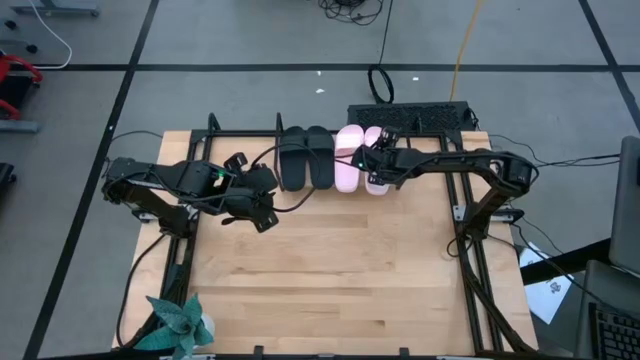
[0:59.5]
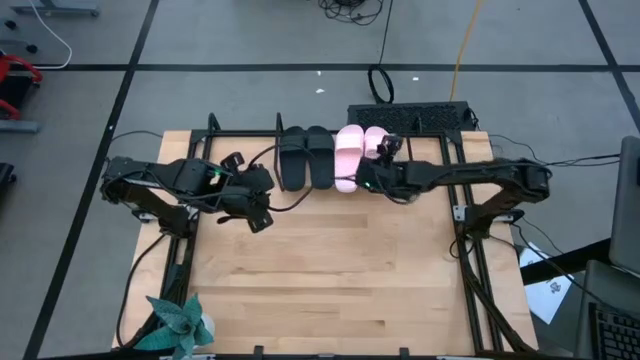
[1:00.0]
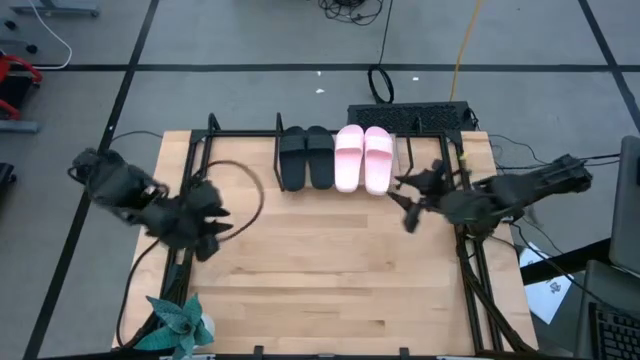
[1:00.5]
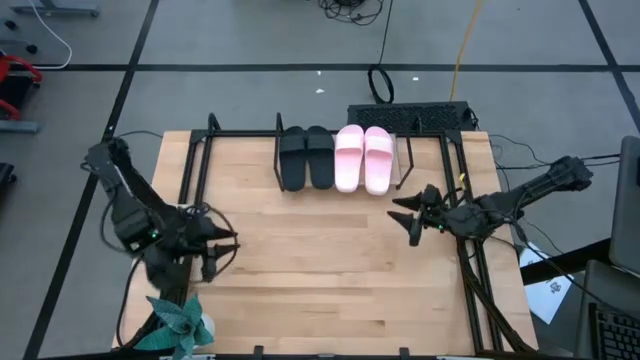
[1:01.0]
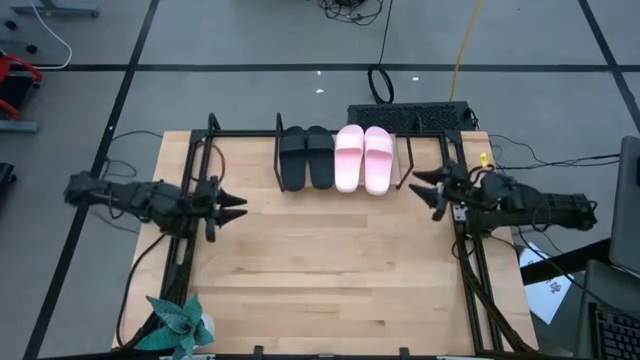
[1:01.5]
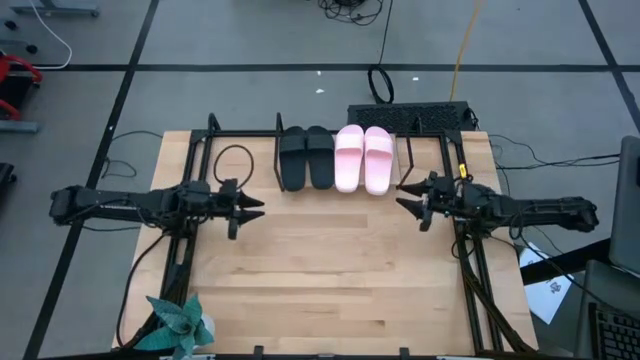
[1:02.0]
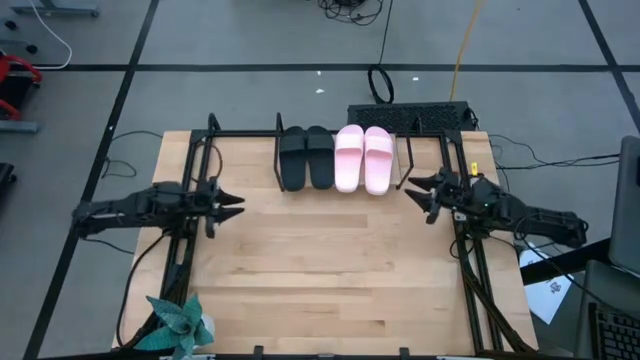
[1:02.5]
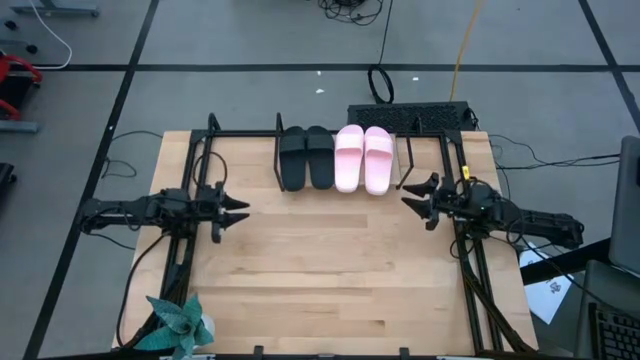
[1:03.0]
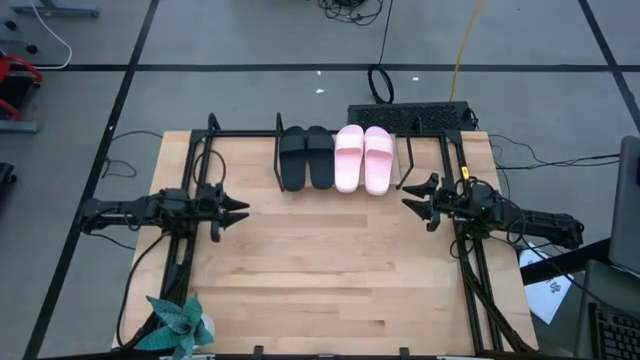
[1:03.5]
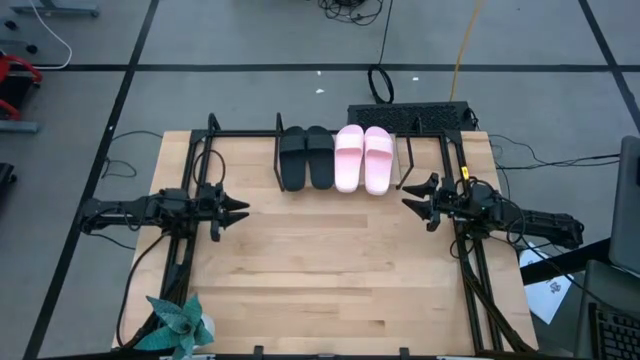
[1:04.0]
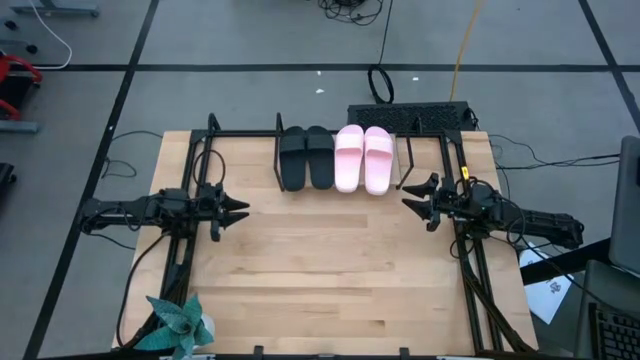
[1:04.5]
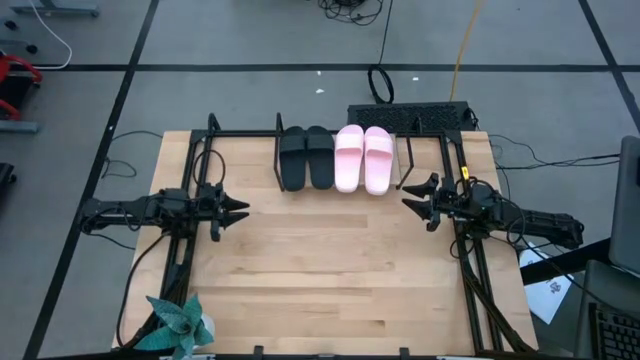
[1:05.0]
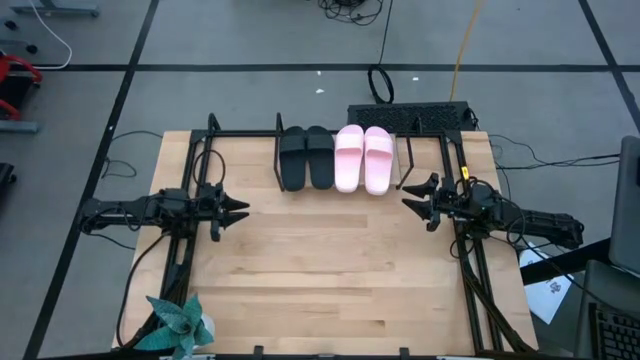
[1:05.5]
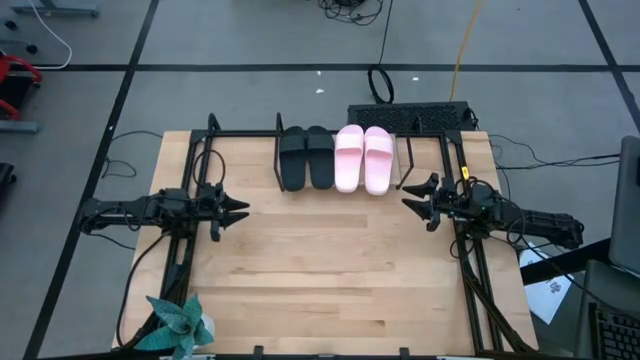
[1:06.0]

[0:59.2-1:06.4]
Task: Pick and place slides into the shelf
Return to Home Position

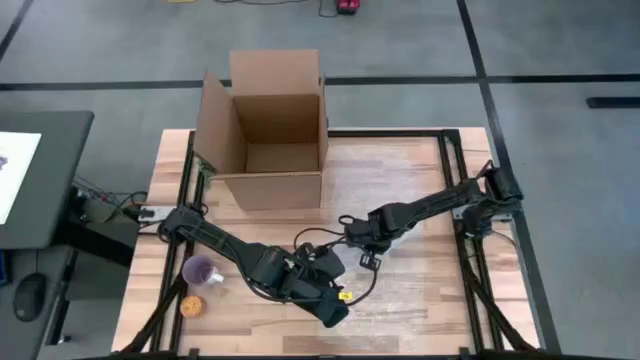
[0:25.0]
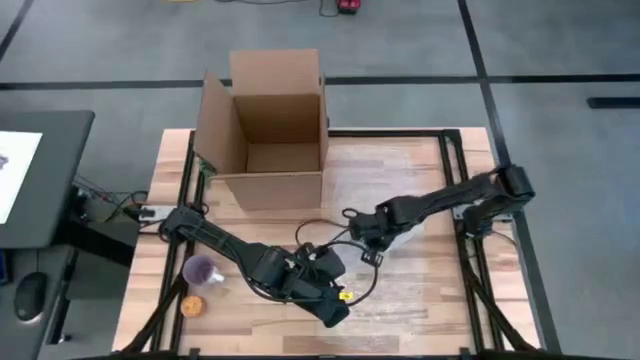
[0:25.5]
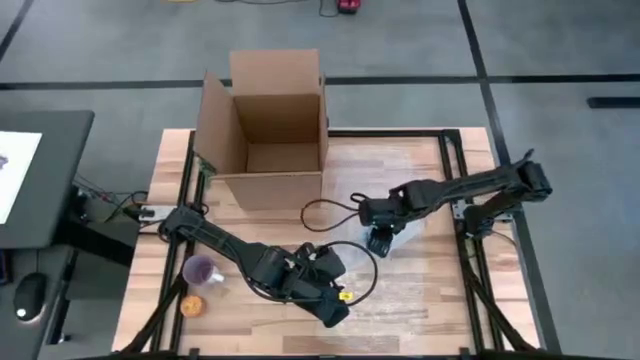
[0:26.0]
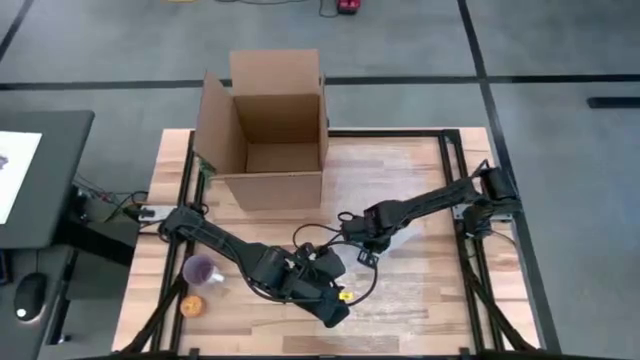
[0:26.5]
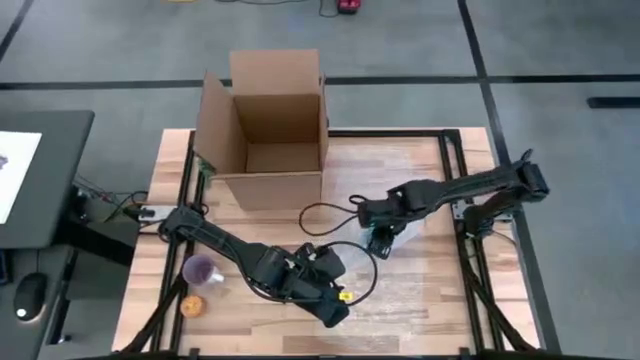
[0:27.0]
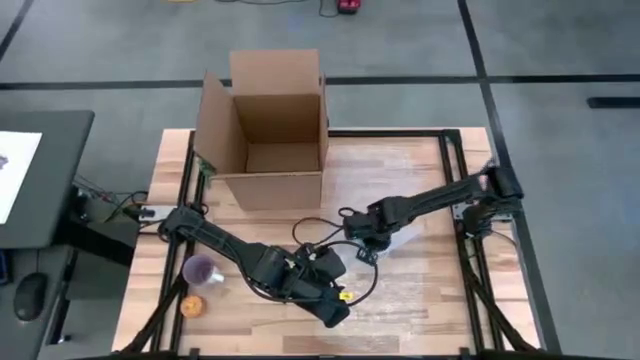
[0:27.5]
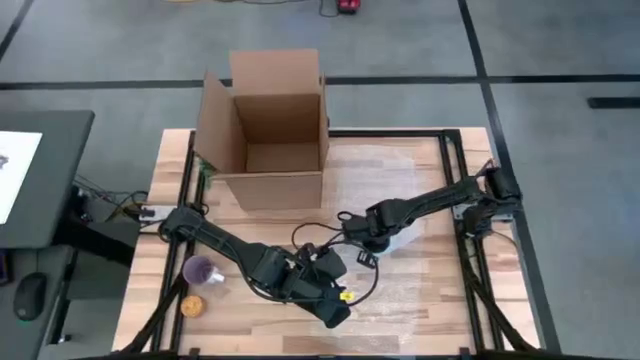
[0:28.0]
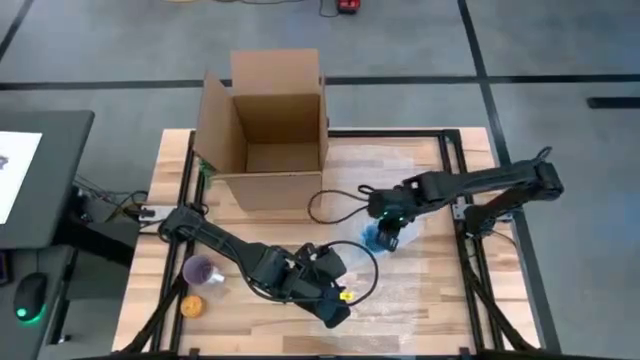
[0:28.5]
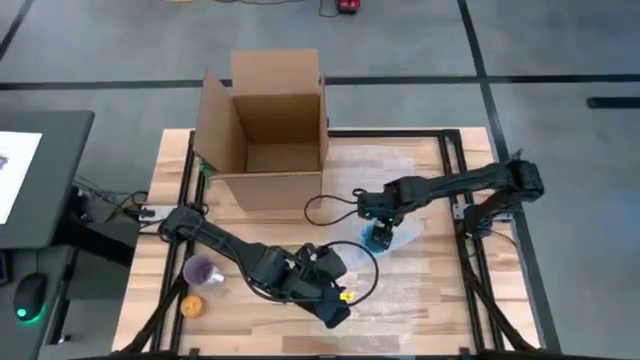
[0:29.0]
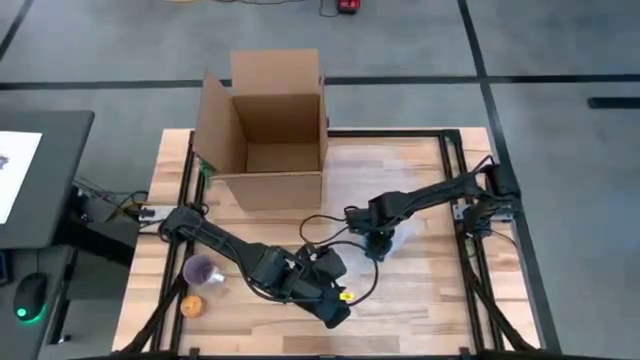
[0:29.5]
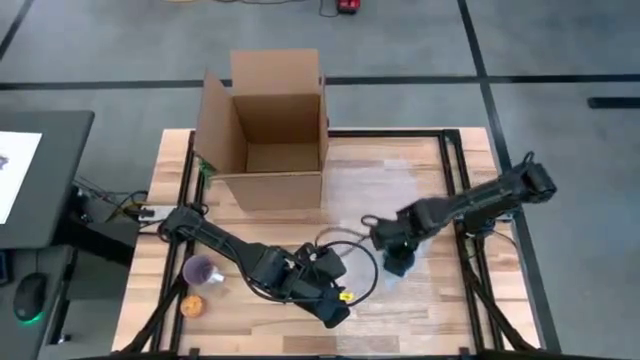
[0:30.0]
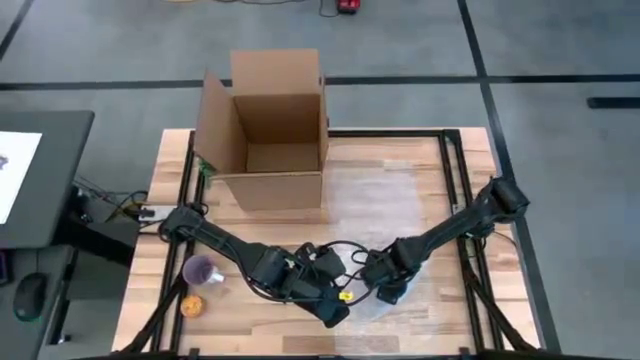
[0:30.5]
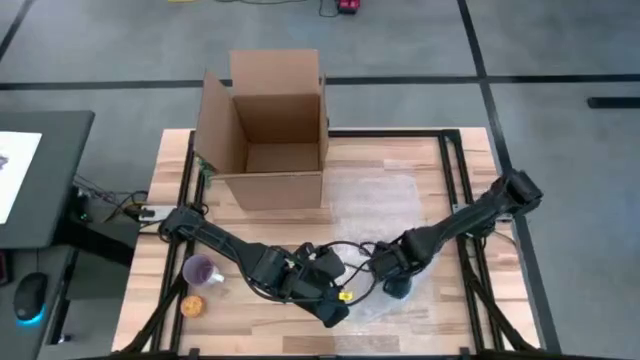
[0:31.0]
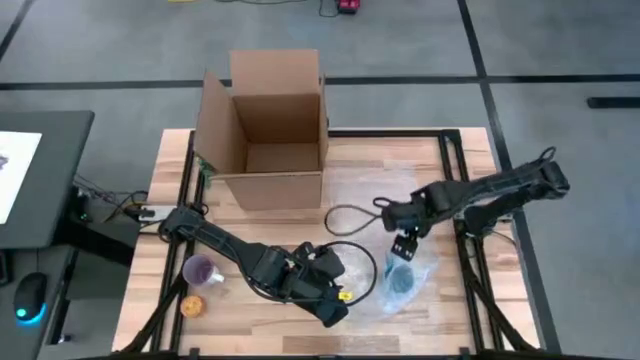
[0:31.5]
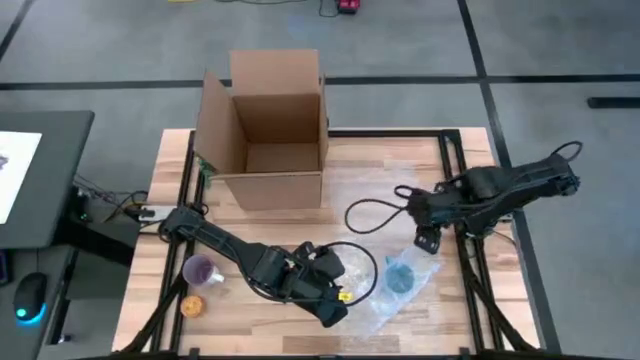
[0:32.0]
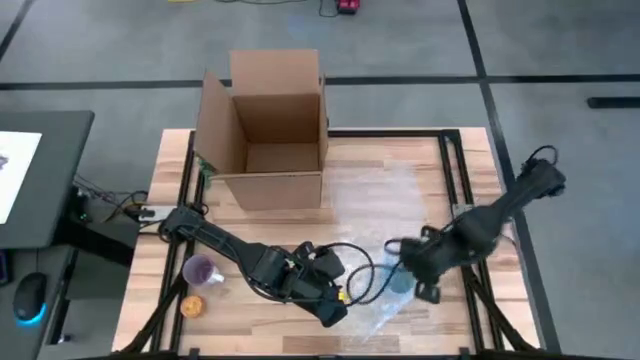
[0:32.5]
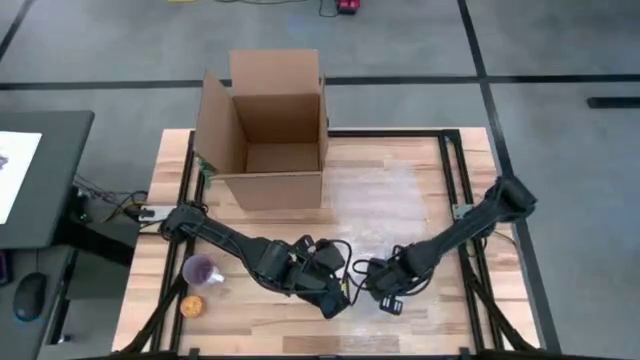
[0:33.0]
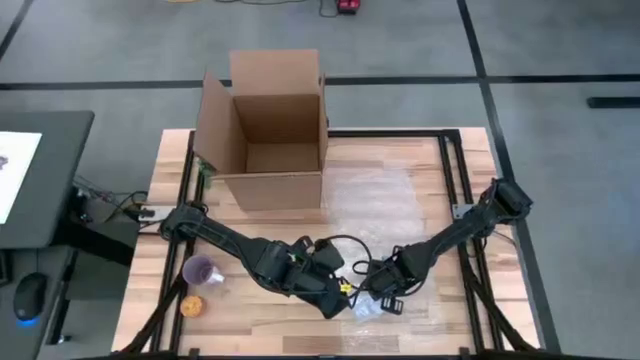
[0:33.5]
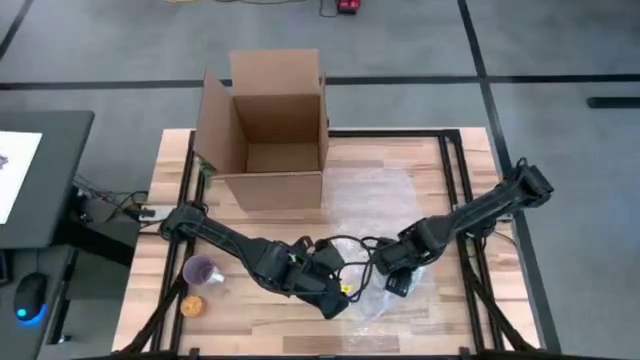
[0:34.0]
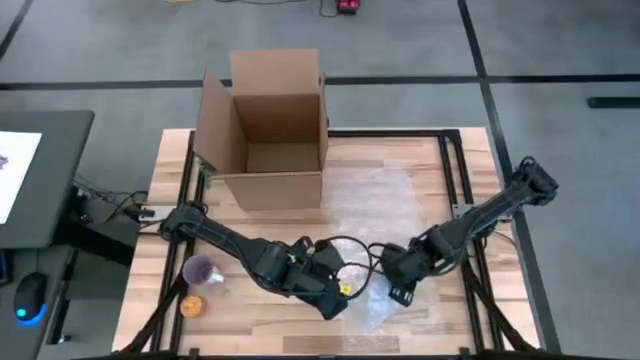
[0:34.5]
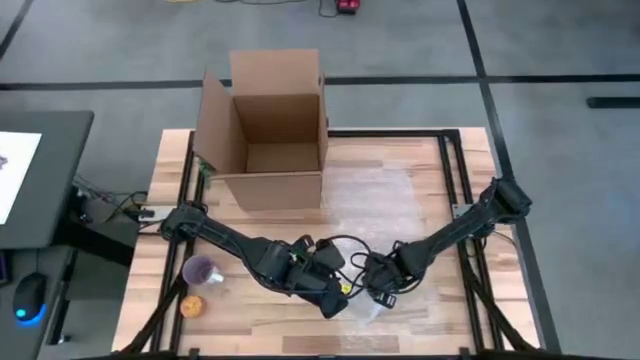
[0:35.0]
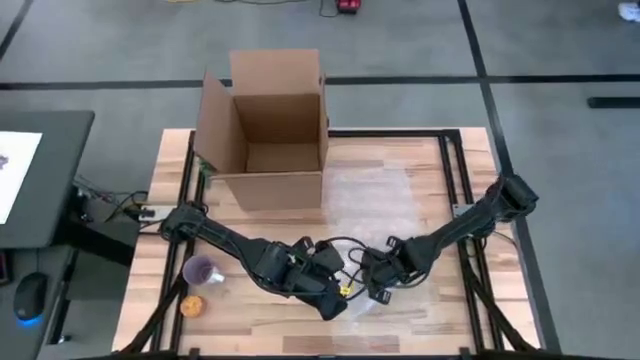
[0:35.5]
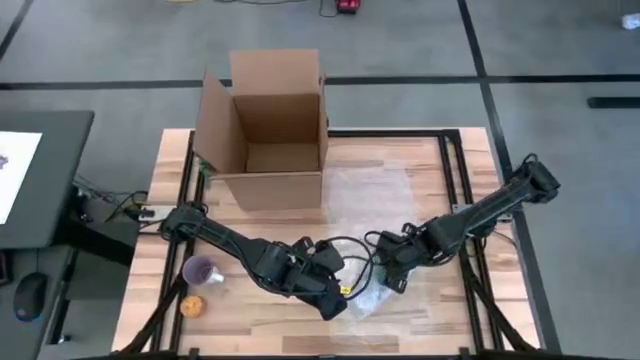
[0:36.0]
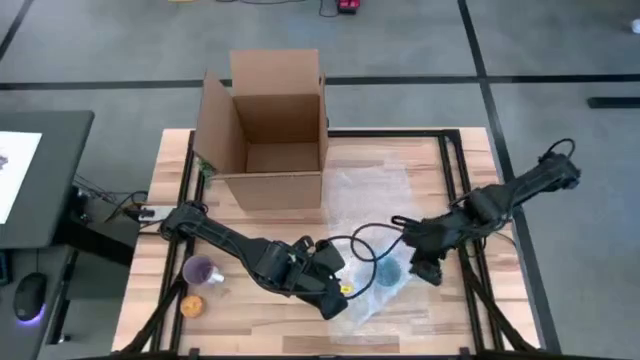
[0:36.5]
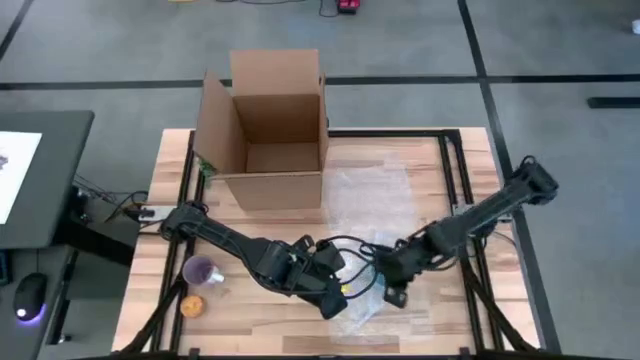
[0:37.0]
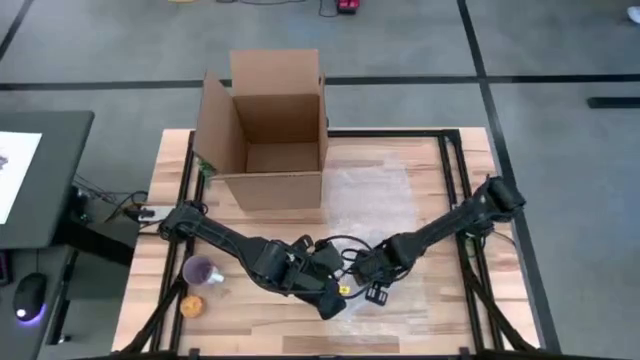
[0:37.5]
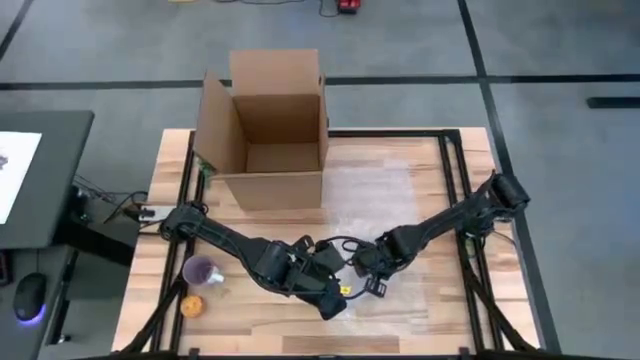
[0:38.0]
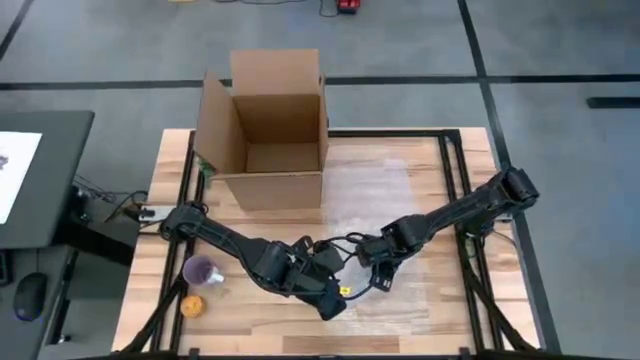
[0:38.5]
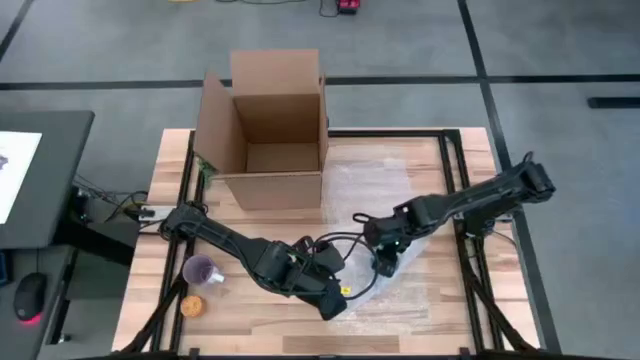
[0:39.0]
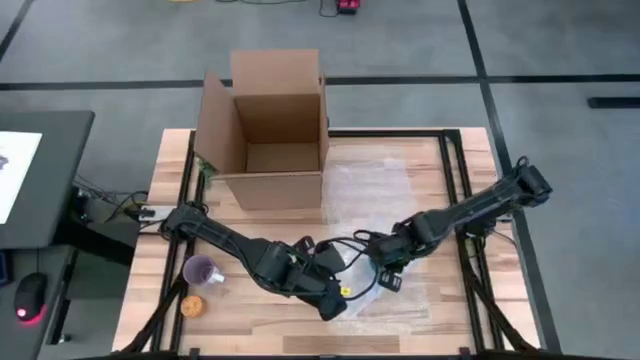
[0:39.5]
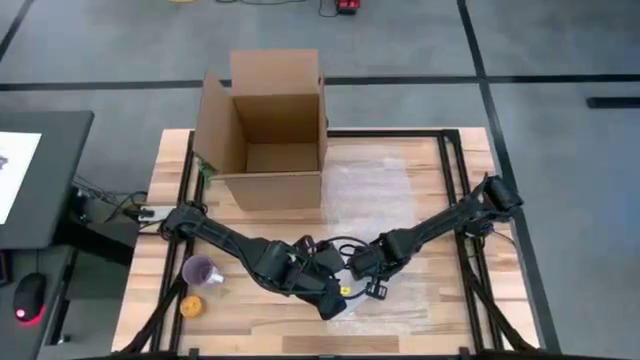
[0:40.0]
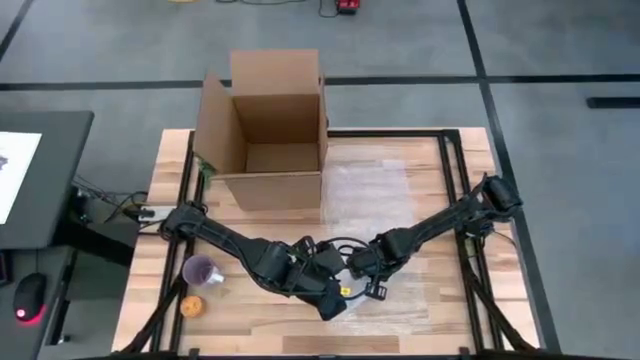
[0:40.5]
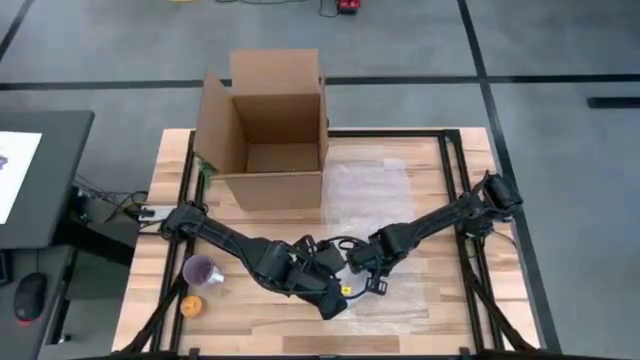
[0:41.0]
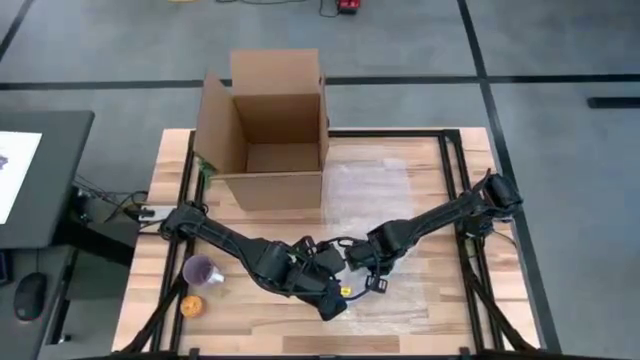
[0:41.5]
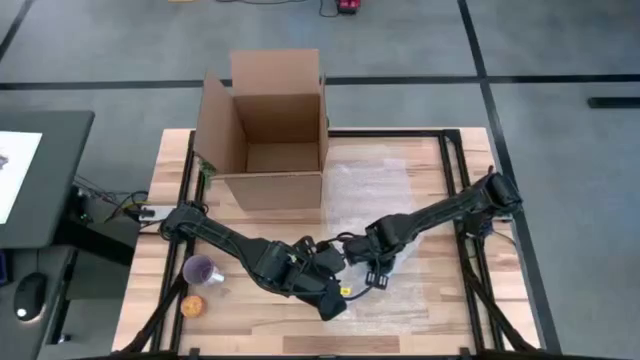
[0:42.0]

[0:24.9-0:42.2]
Task: wrap mug
Wrap the blue mug with the bubble wrap
